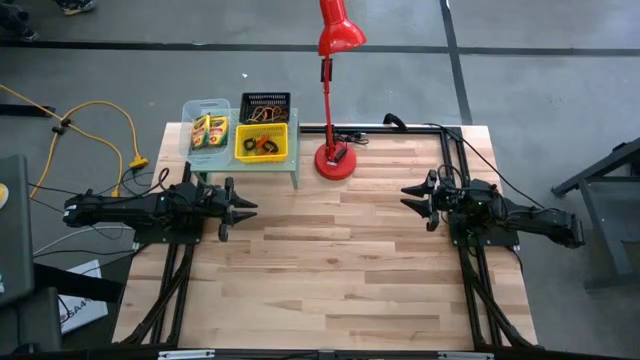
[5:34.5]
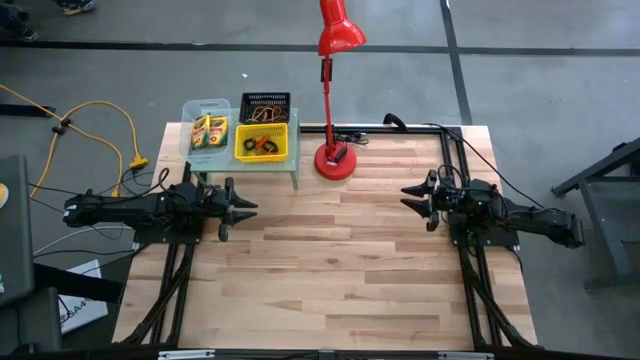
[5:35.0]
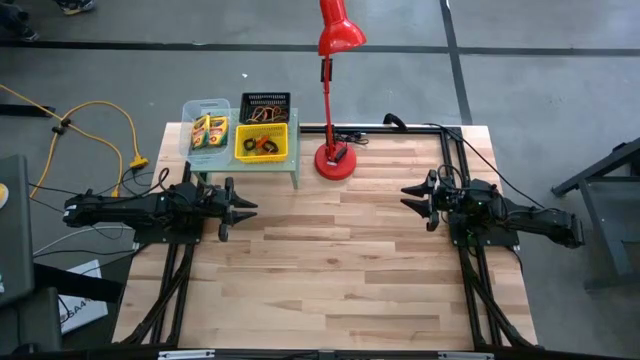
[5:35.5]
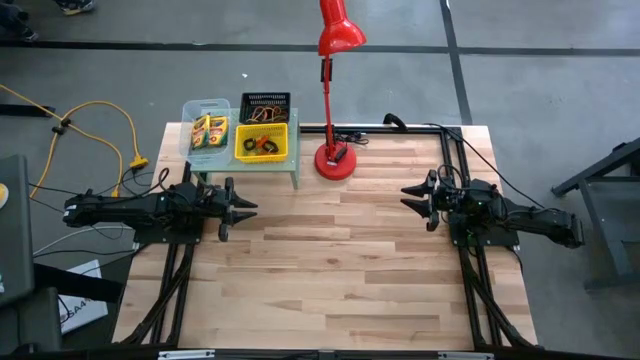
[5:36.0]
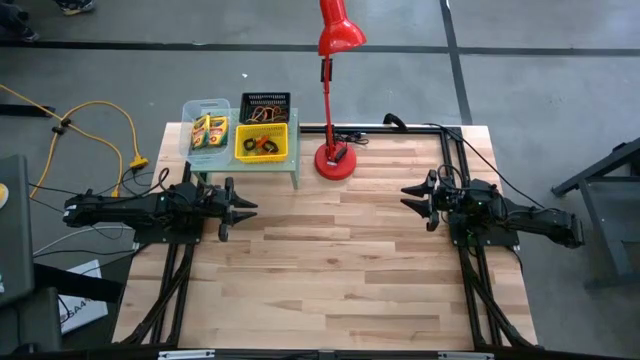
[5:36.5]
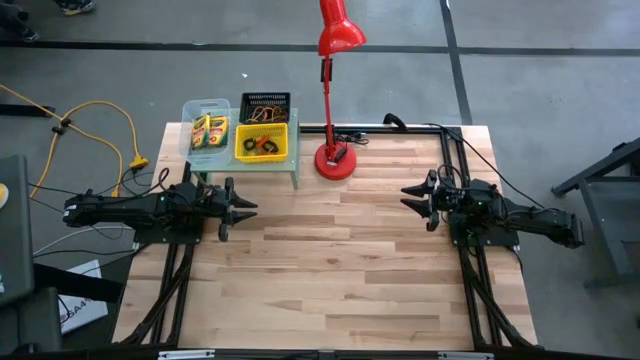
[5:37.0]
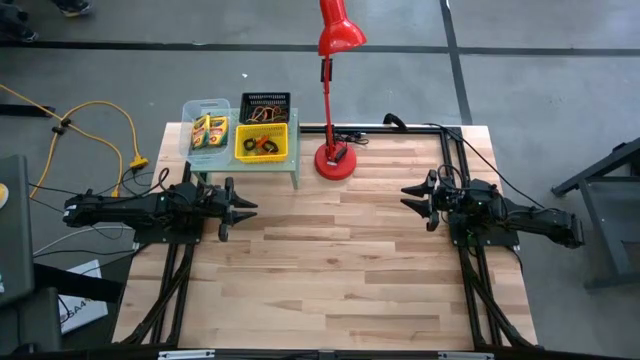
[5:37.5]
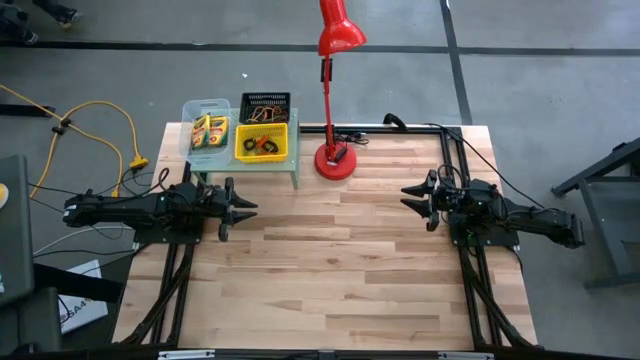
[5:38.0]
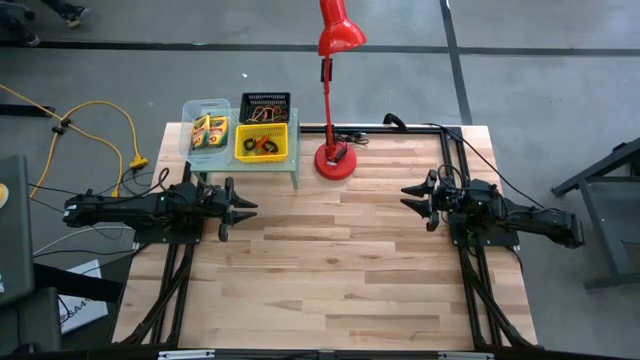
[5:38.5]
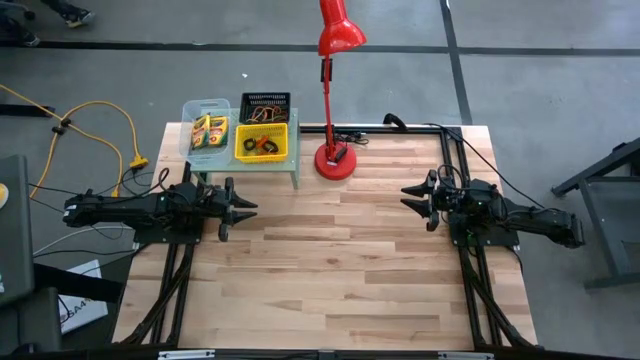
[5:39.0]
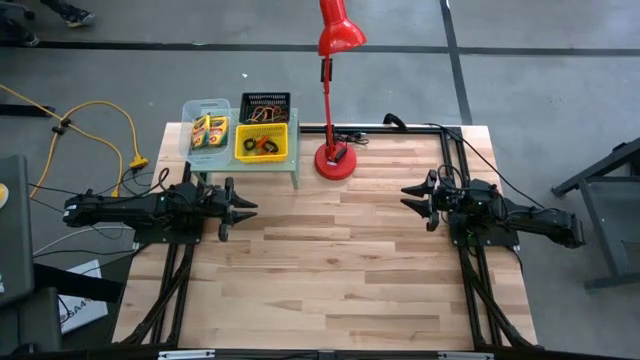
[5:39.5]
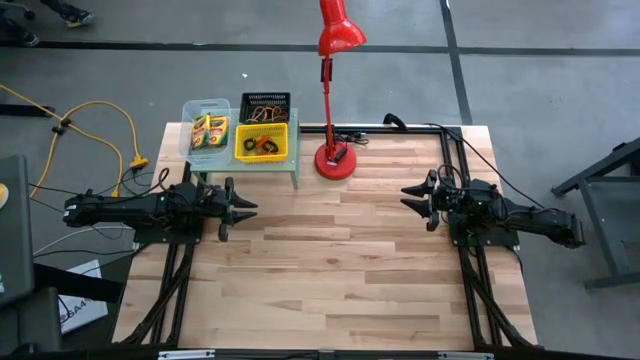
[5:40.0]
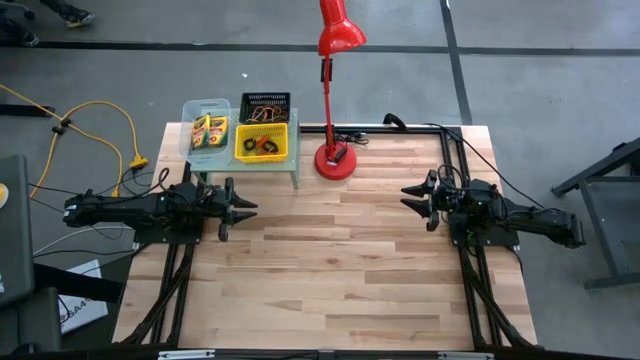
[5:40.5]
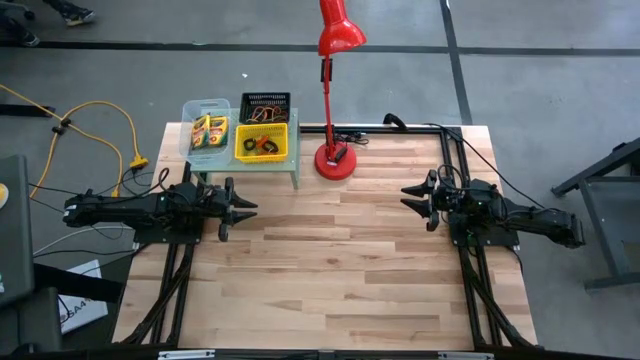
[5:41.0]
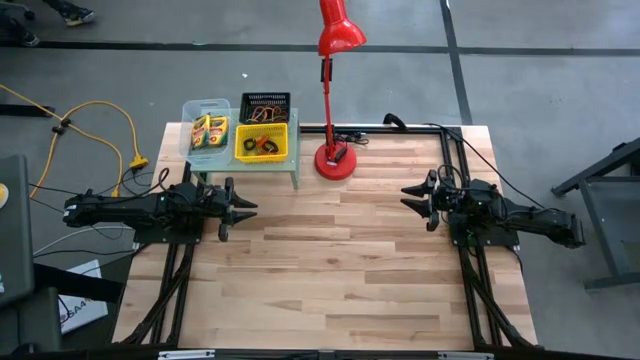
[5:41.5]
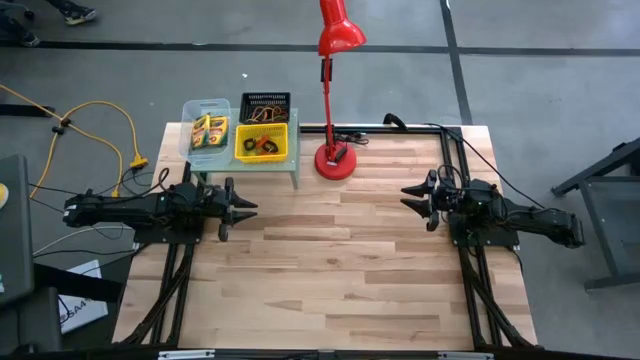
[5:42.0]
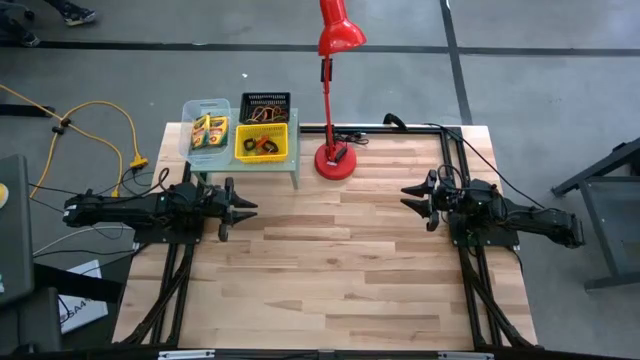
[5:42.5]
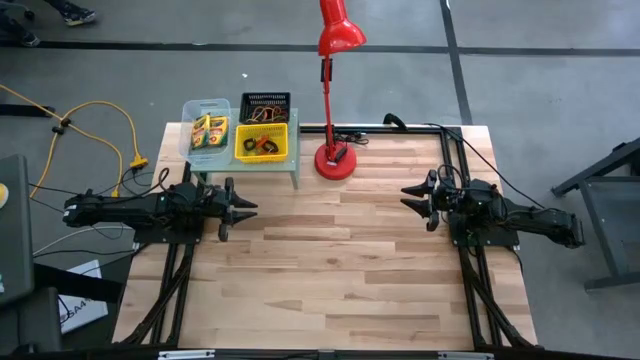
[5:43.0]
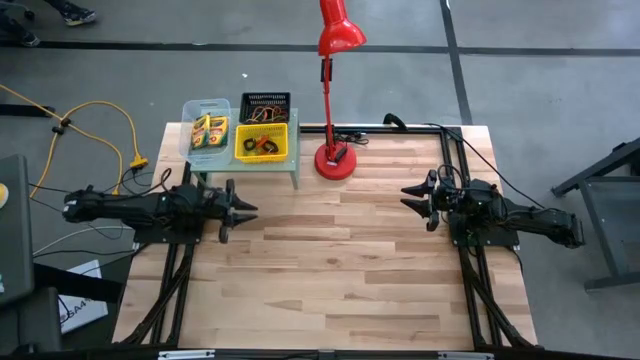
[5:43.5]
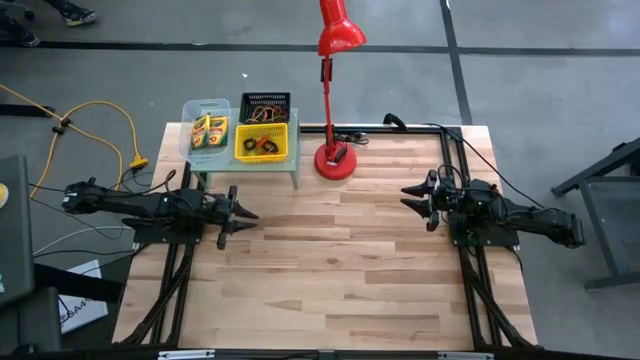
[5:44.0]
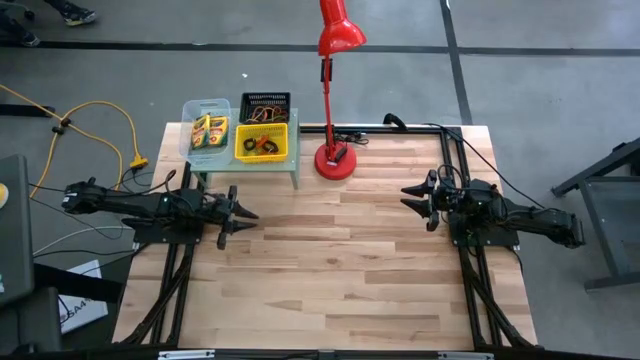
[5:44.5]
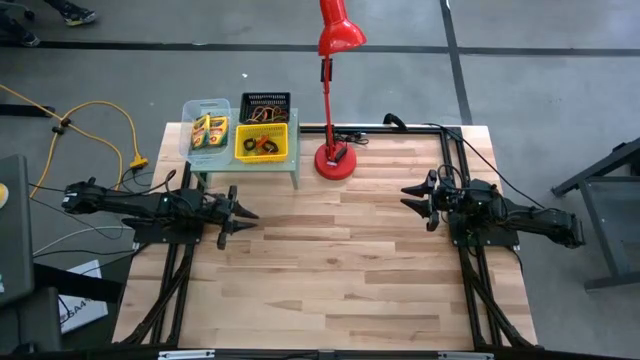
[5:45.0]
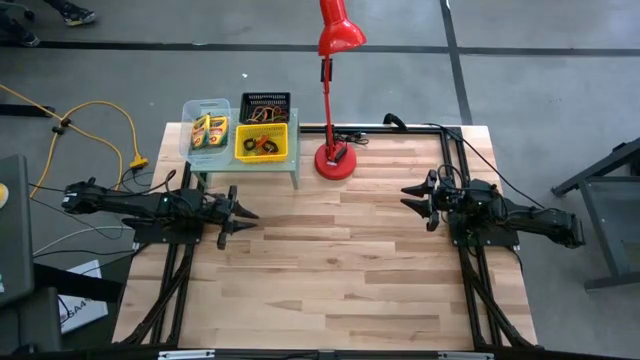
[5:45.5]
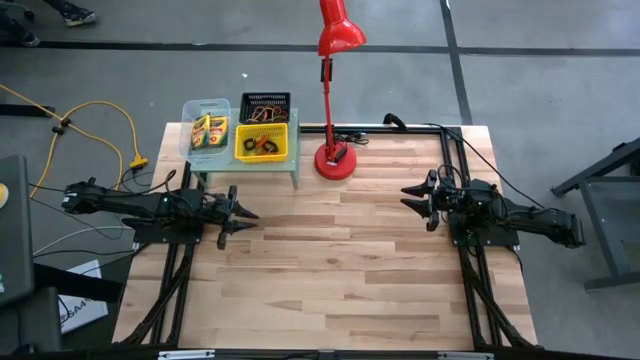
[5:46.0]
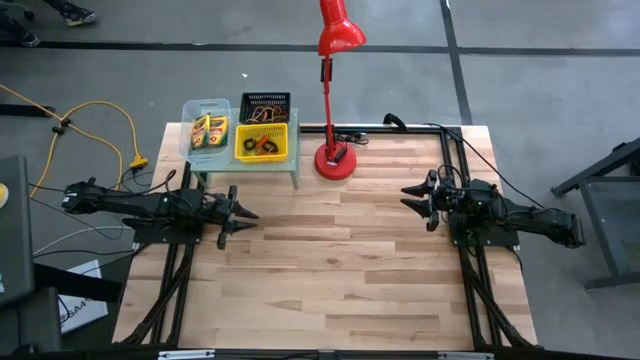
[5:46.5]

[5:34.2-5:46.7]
Task: Pick & Place Office Desk Supplies
Return to Home Position

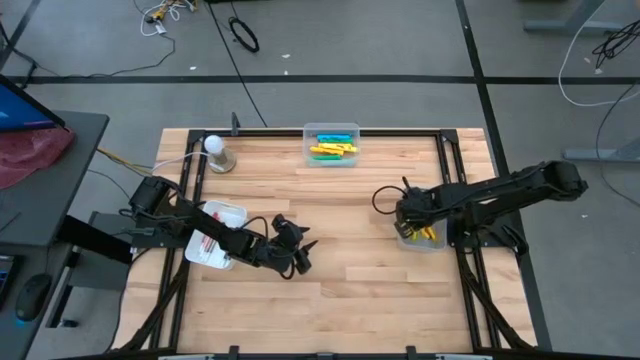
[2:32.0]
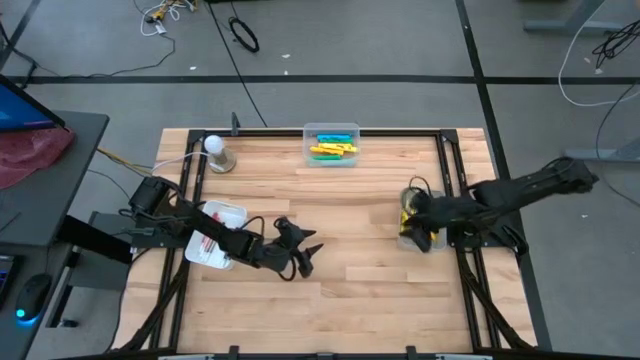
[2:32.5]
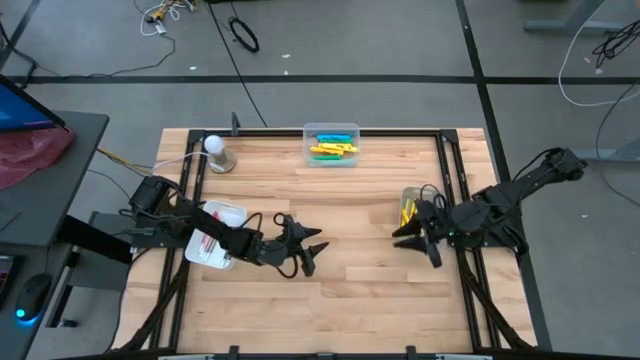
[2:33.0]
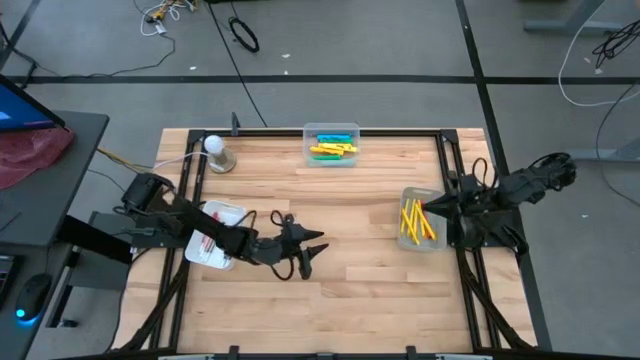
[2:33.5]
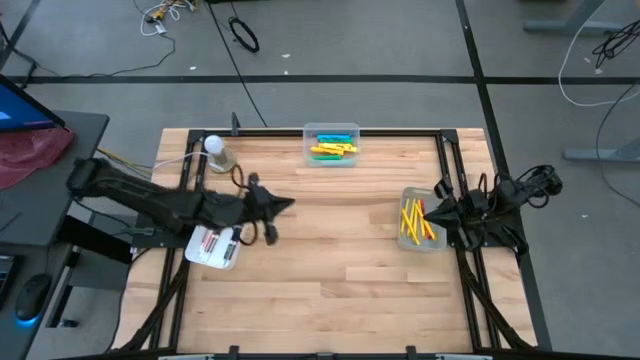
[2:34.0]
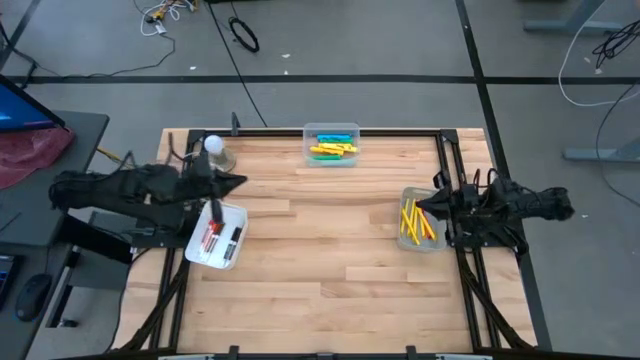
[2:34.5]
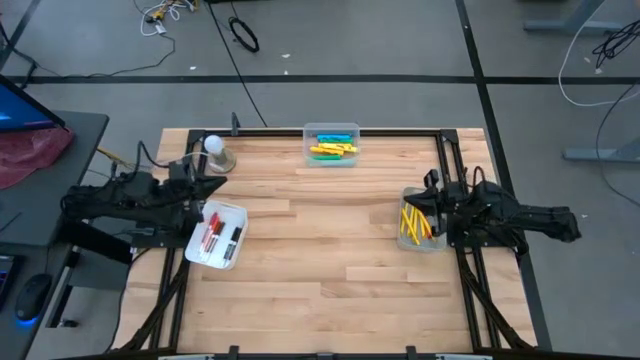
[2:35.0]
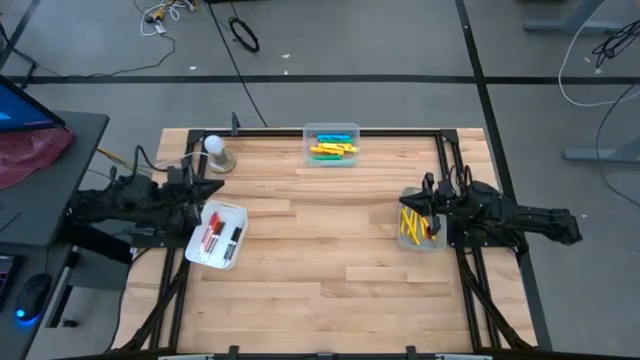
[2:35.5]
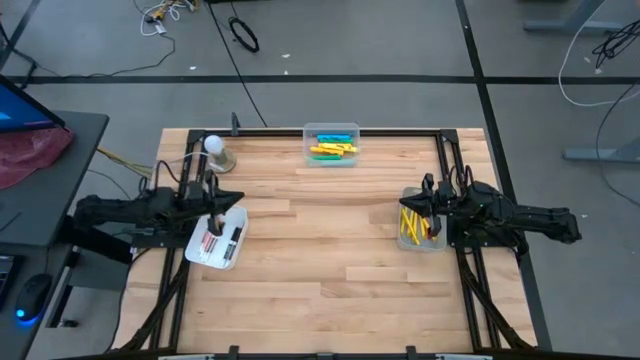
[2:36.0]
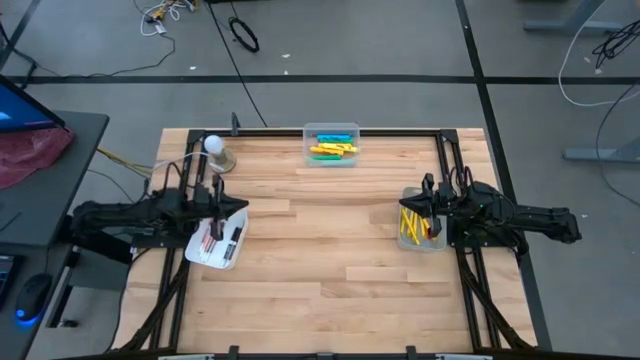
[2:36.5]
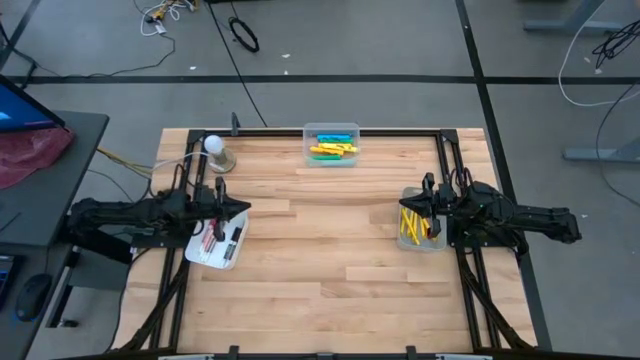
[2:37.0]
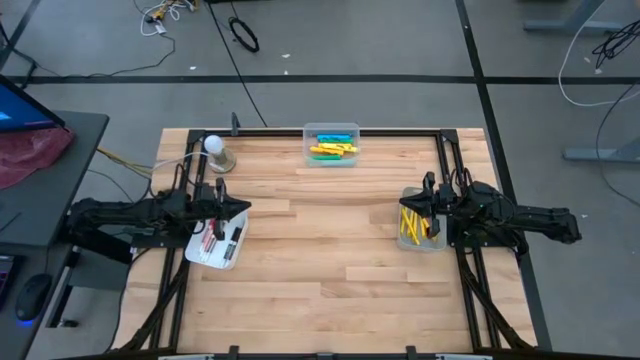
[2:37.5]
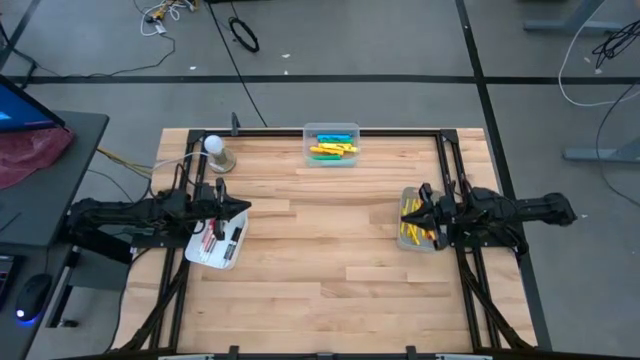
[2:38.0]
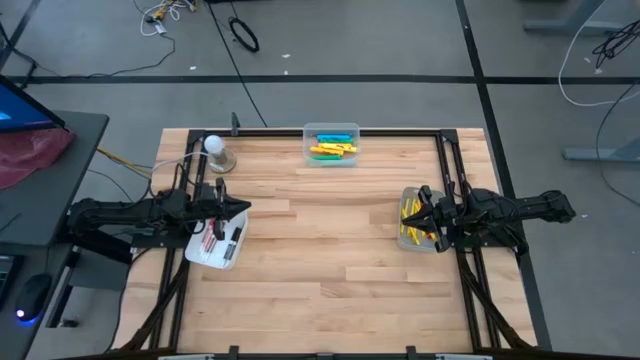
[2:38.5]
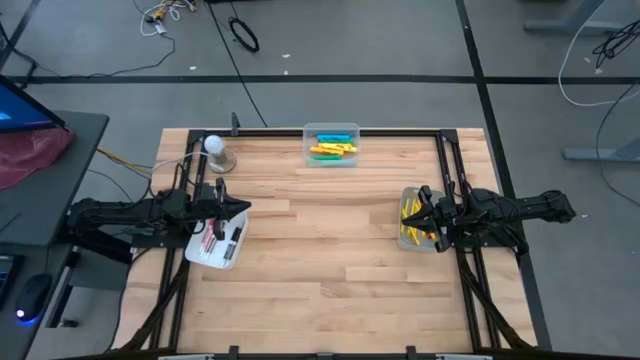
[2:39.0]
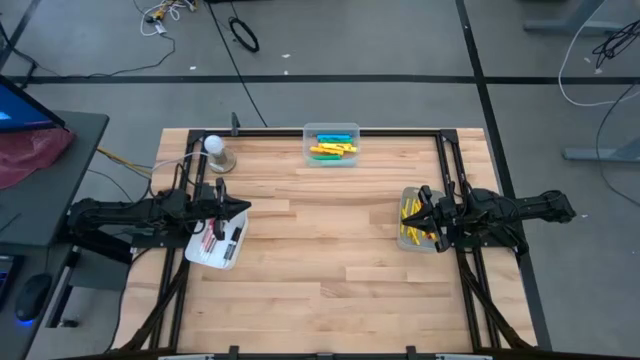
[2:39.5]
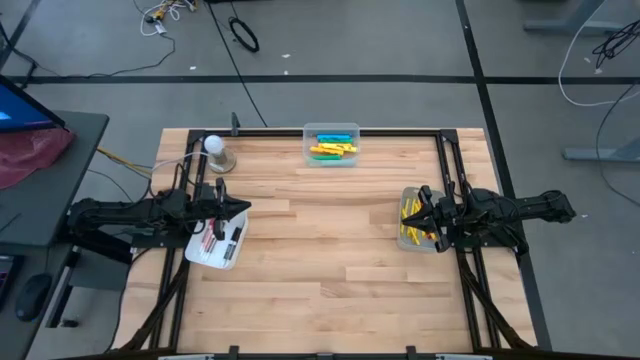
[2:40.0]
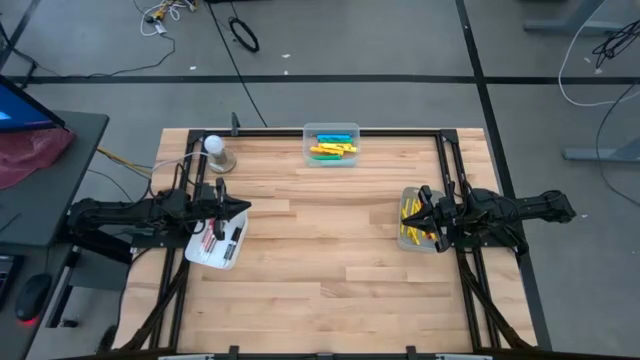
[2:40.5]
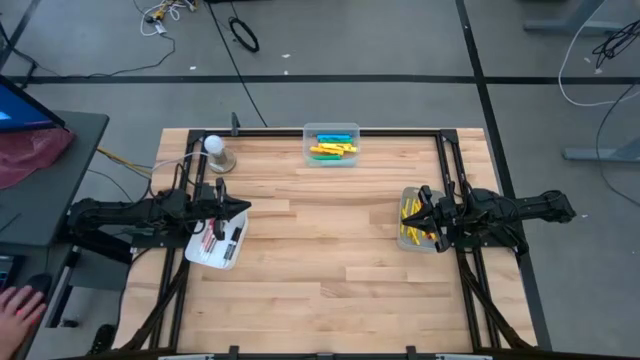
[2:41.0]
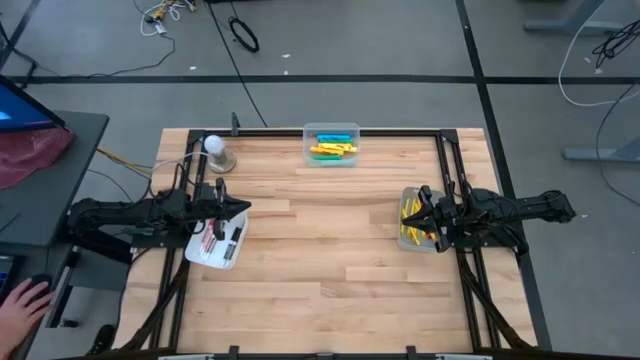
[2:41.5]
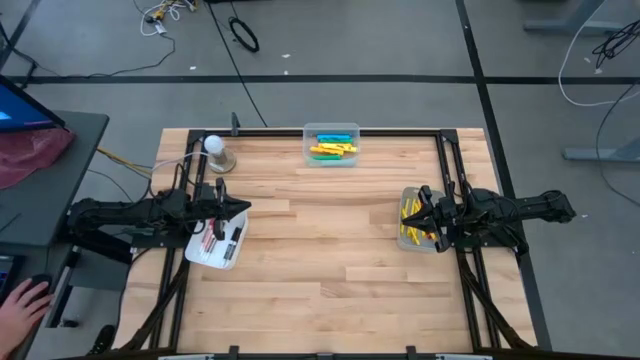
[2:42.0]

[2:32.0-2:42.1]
Task: Pick & Place Markers
Return to Home Position
